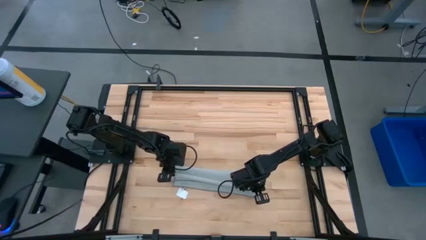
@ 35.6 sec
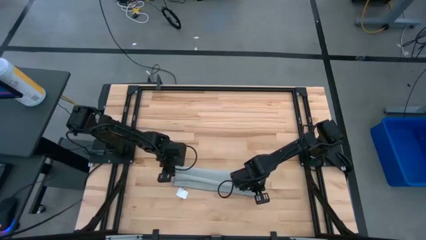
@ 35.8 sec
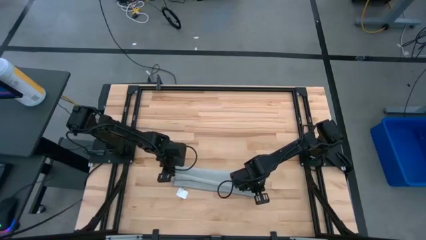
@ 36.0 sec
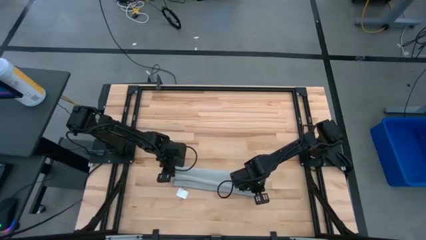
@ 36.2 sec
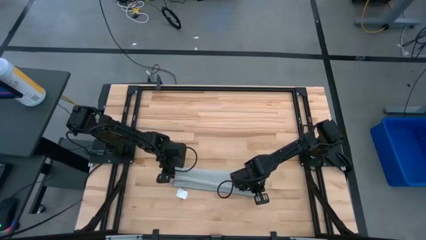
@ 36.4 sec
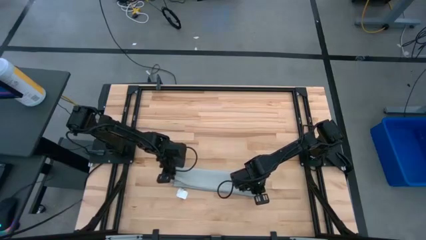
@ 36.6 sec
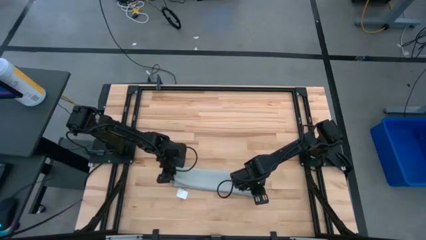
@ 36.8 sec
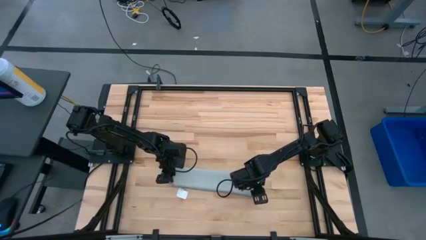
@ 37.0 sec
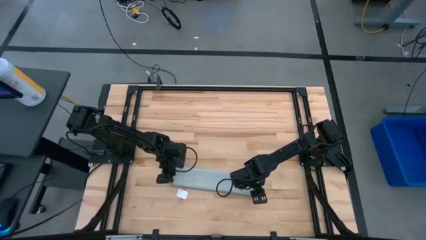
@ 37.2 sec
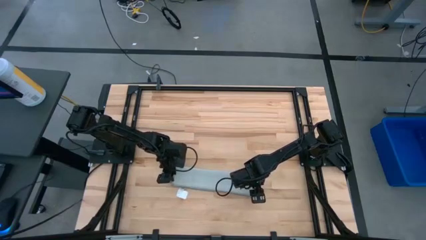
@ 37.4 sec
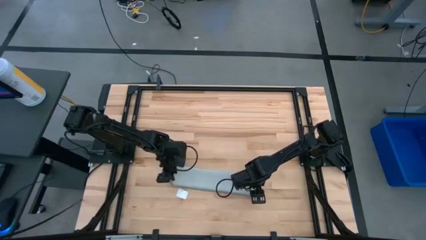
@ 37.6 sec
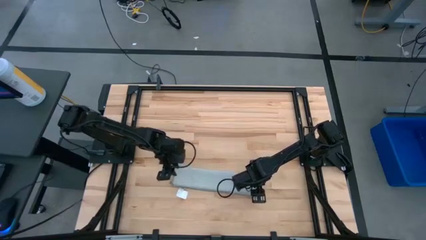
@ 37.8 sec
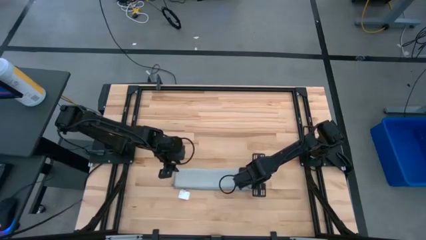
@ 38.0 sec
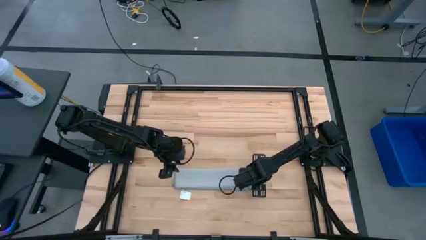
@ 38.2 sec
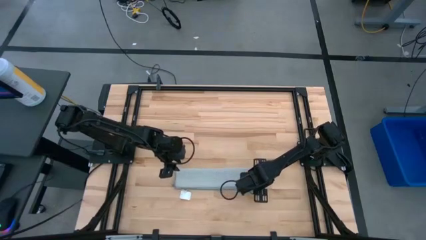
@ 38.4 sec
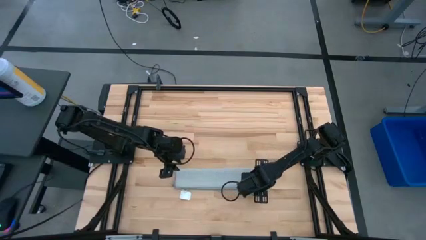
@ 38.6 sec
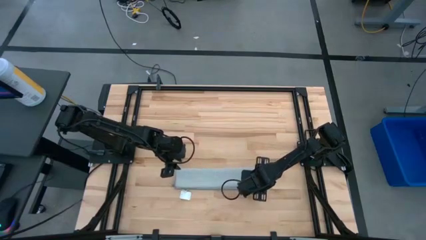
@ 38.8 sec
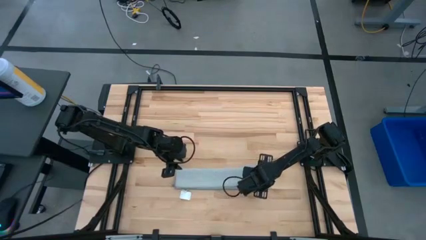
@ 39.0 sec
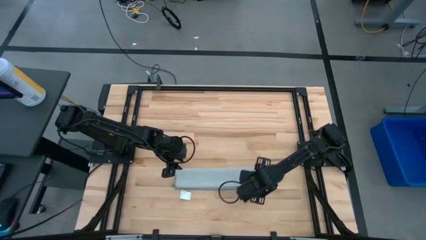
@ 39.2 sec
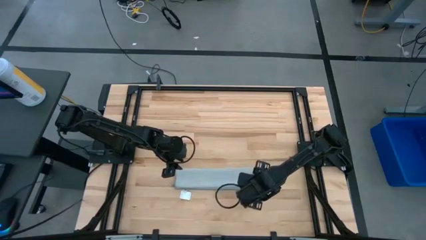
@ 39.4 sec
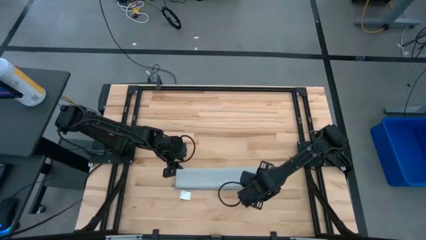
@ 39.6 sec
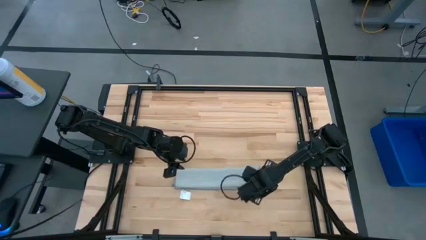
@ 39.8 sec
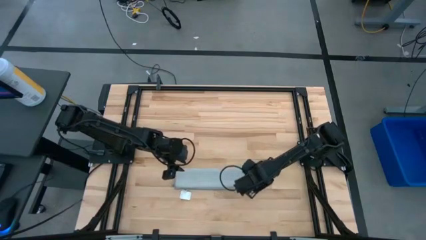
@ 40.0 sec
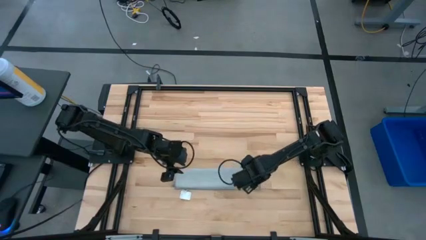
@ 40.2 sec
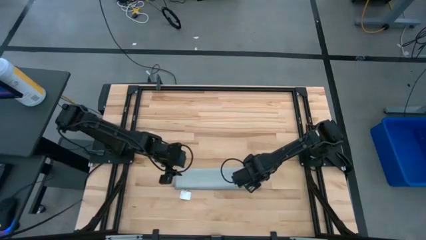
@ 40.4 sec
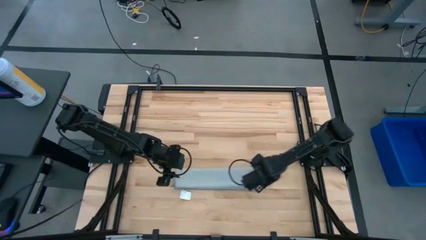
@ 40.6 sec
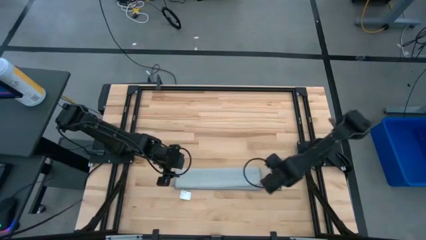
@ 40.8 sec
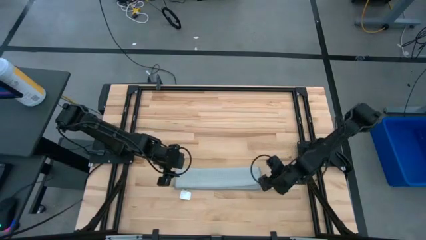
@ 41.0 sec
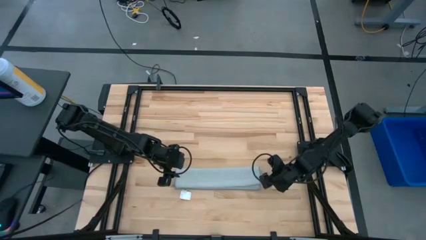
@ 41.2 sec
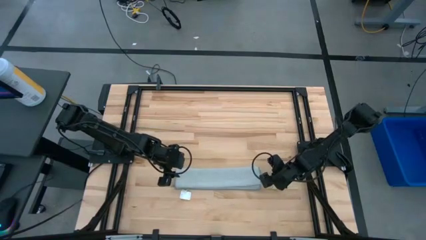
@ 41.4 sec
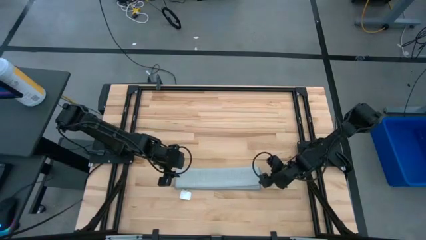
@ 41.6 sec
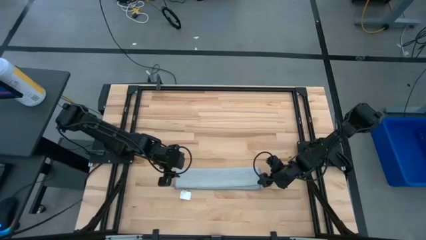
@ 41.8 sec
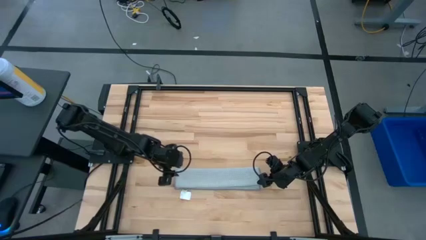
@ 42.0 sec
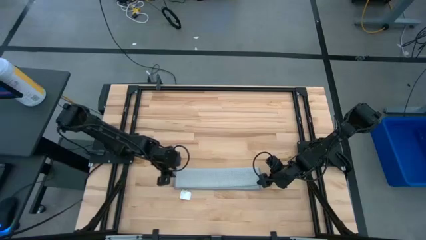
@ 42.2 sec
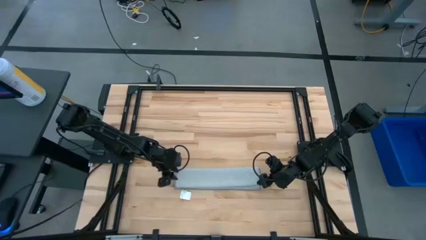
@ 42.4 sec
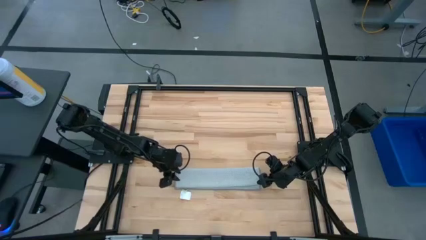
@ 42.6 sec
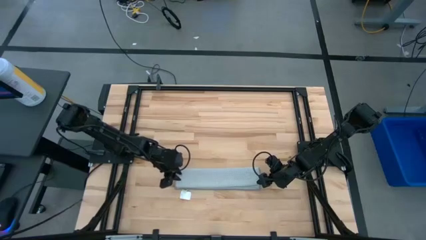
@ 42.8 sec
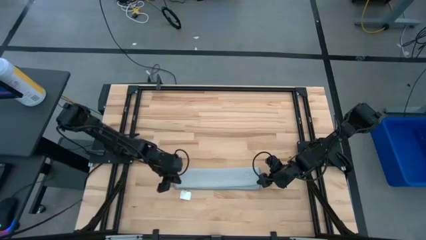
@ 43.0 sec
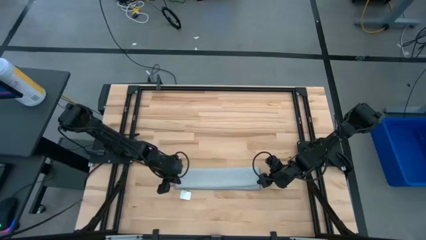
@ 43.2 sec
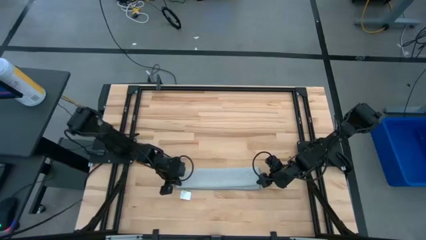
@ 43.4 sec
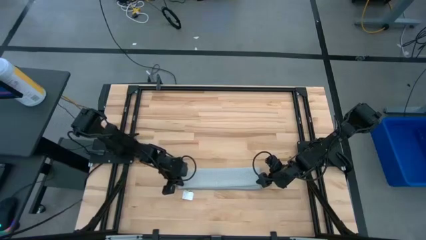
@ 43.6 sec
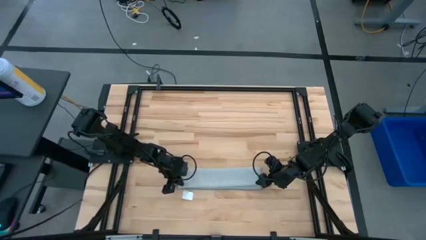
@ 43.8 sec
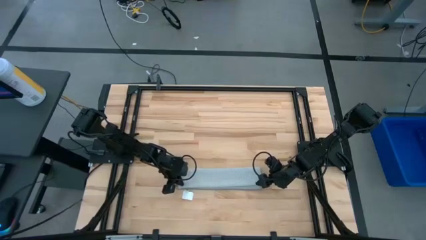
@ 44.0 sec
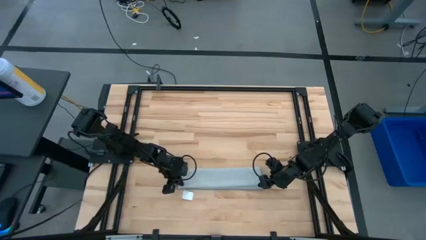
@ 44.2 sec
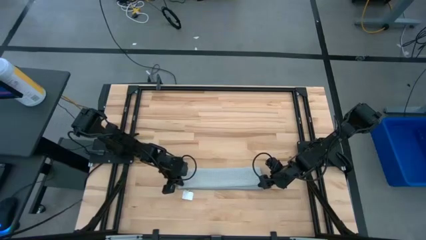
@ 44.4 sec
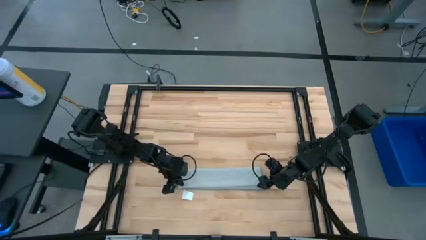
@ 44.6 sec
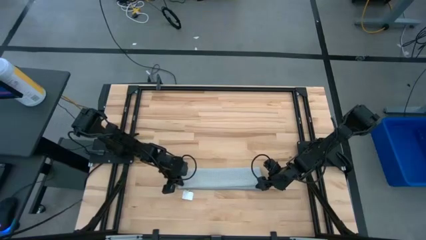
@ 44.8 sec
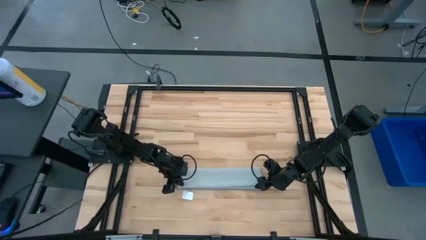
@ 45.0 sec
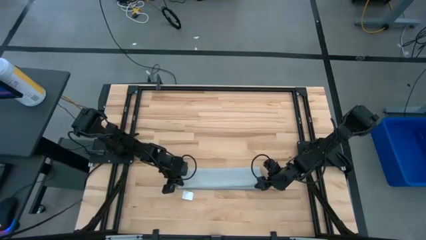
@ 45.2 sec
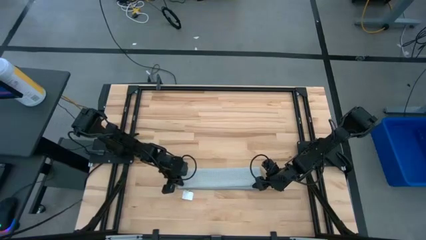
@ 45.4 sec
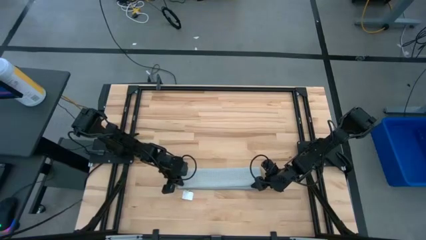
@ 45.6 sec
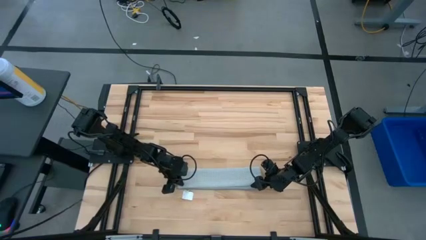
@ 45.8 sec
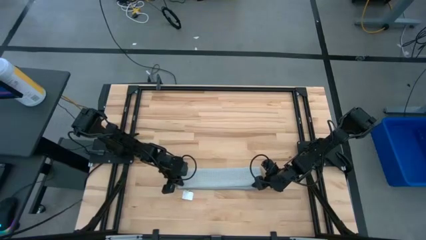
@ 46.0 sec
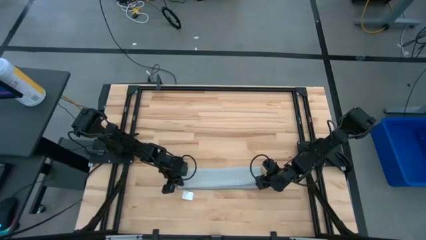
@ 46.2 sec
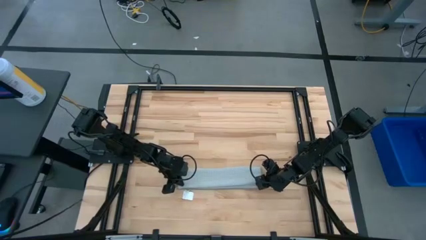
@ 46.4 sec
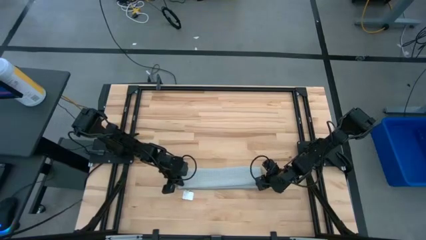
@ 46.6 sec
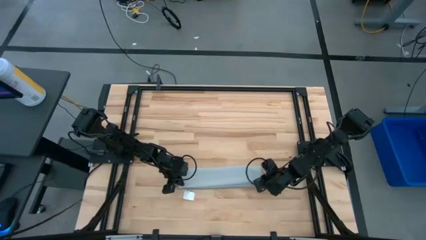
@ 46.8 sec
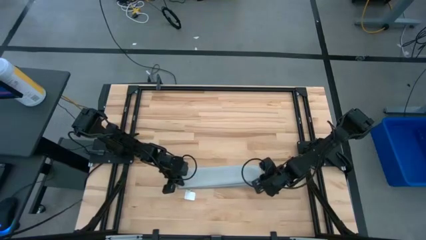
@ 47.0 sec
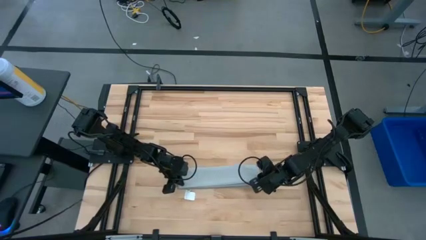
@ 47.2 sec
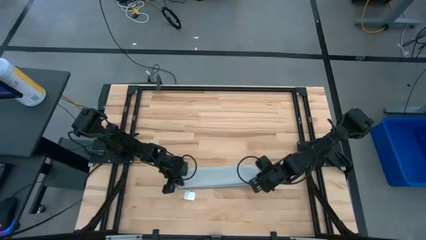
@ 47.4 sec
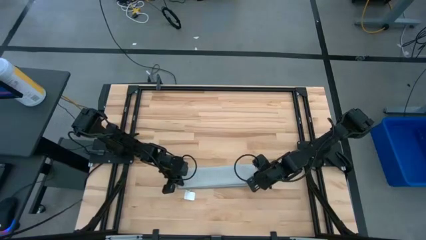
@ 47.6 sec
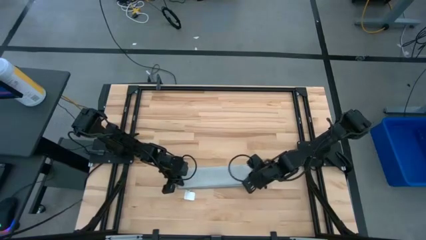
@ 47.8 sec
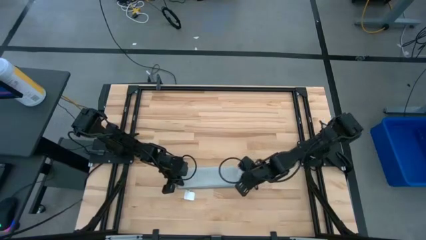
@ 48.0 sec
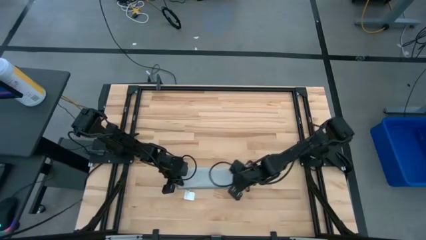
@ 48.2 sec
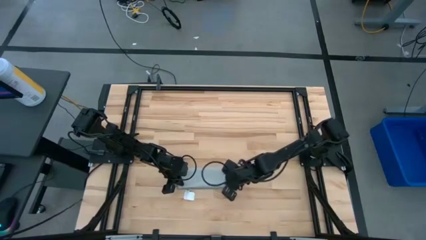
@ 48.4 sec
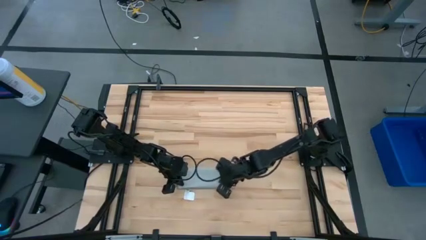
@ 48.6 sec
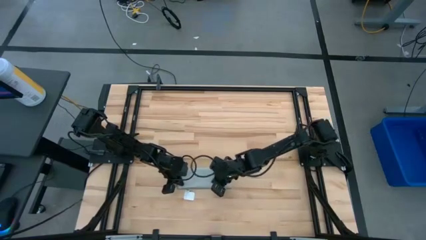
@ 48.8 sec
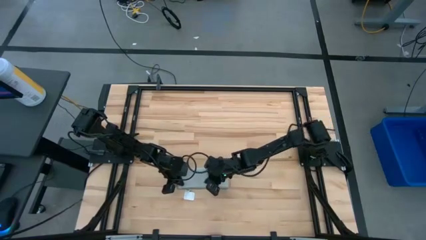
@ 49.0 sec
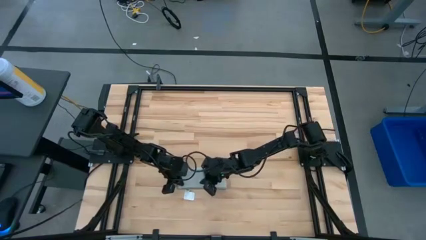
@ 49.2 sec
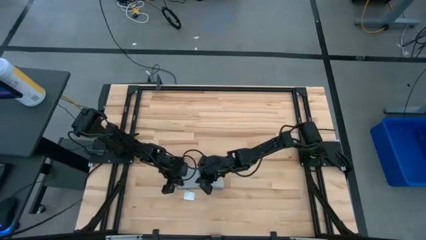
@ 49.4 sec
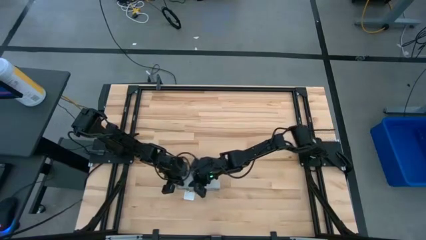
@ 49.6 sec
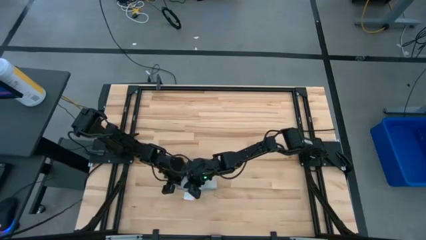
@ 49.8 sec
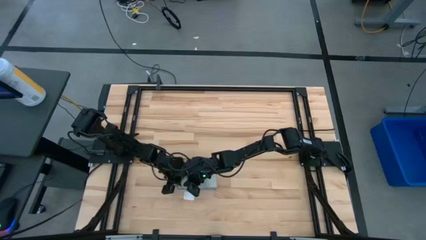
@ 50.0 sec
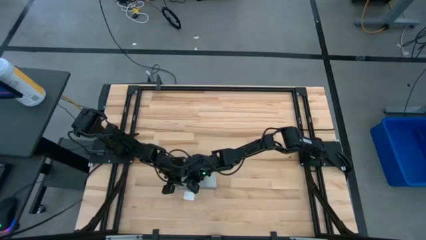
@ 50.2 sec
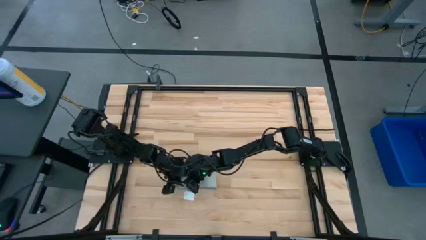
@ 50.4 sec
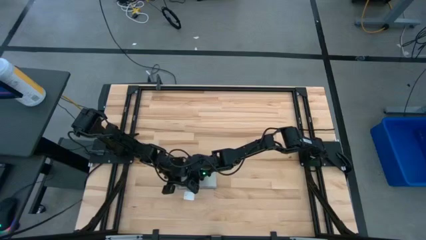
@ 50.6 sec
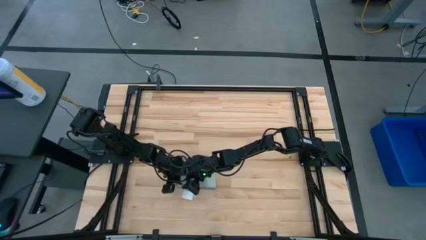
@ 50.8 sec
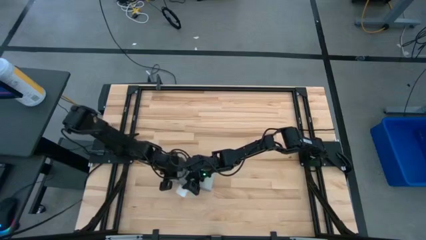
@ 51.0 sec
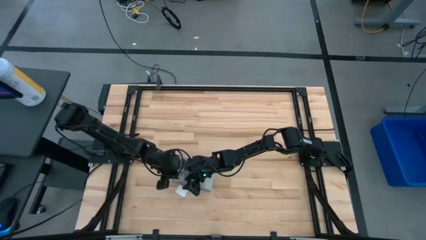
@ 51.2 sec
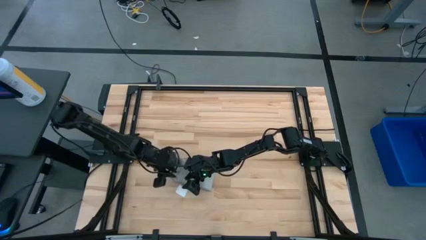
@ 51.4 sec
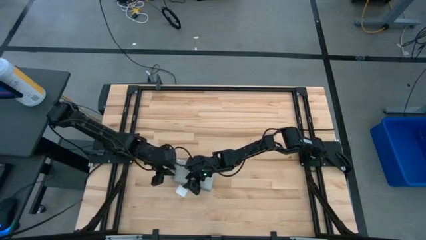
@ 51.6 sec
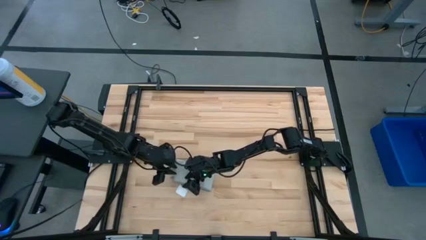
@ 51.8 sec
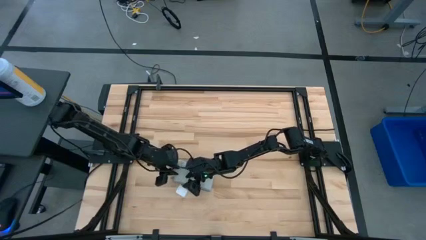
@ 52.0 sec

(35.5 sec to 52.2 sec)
Task: Fold microfiber towels
Fold the gray towel
